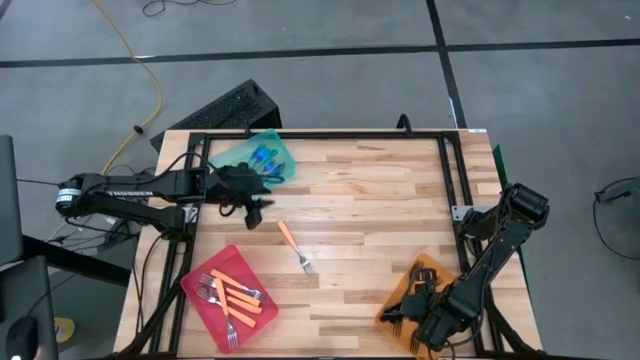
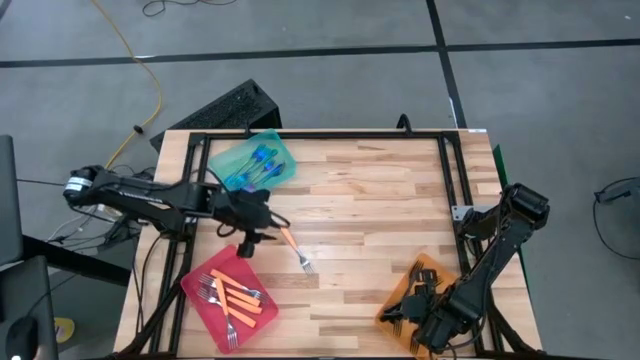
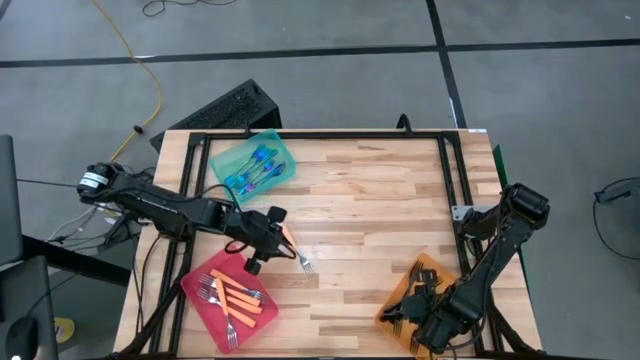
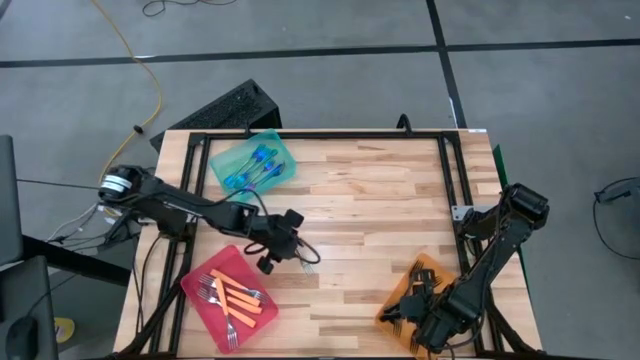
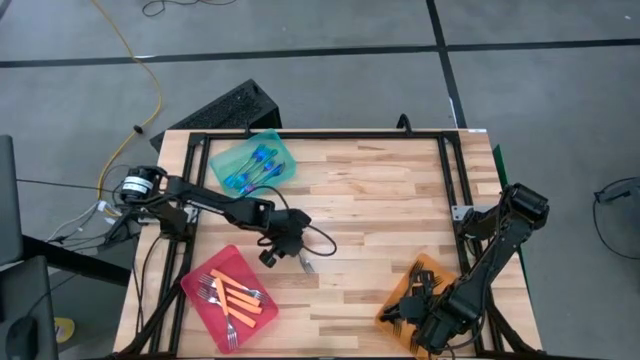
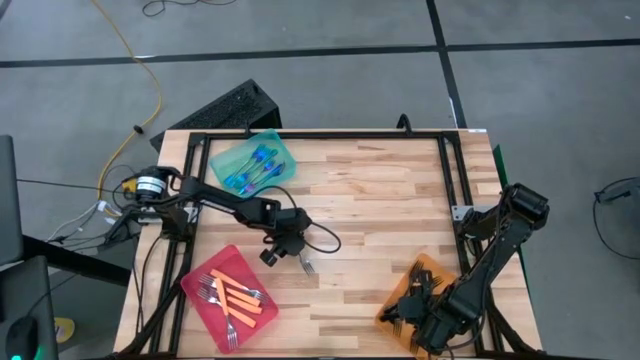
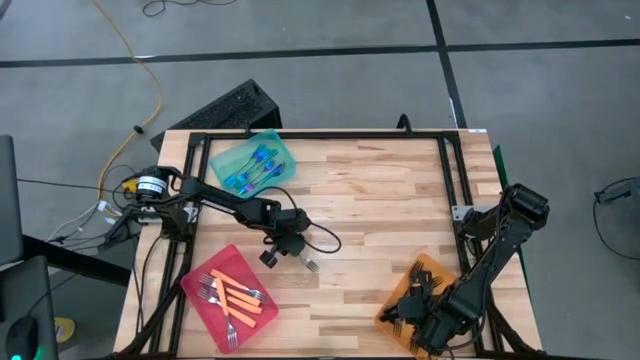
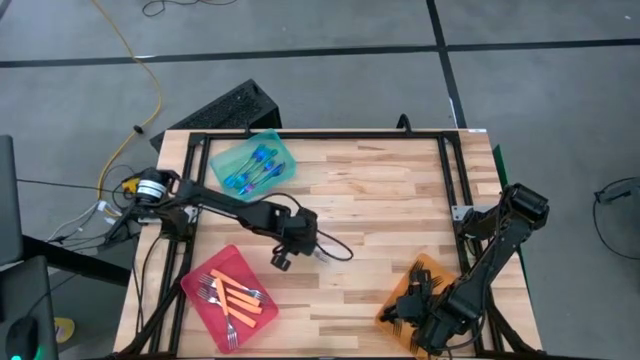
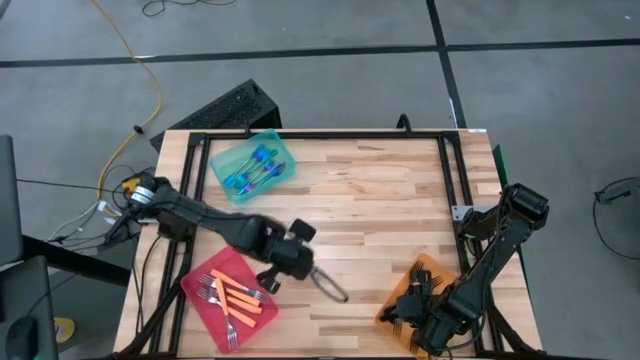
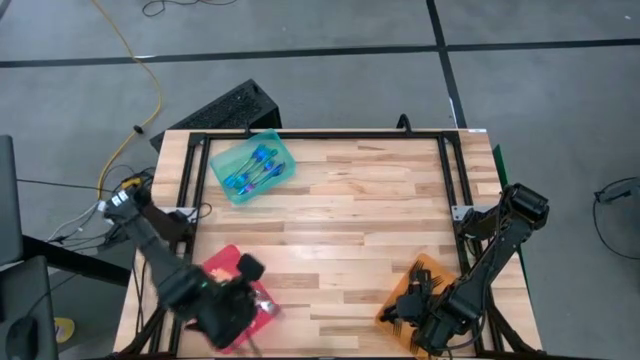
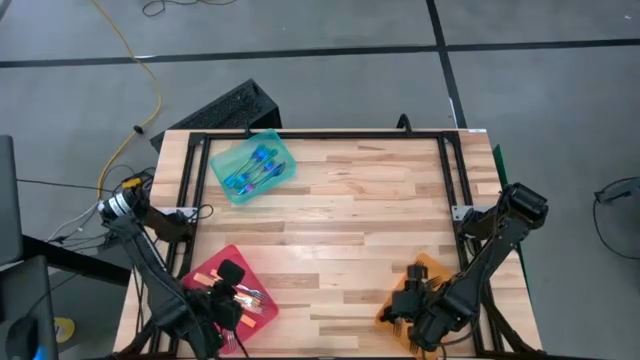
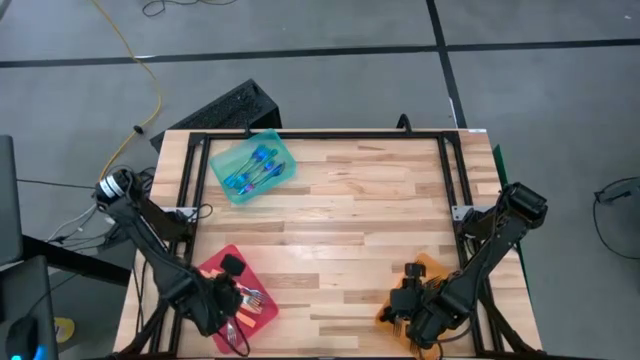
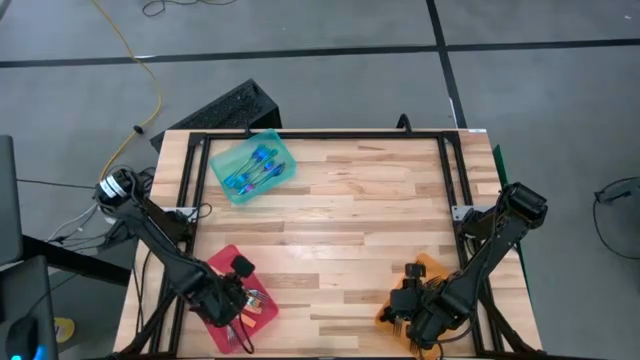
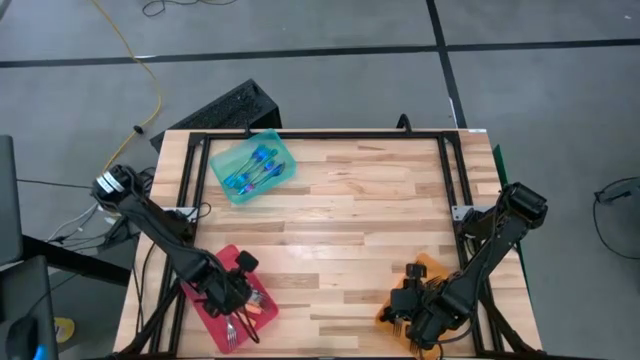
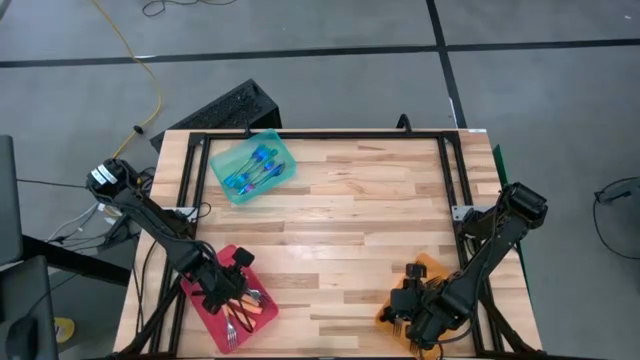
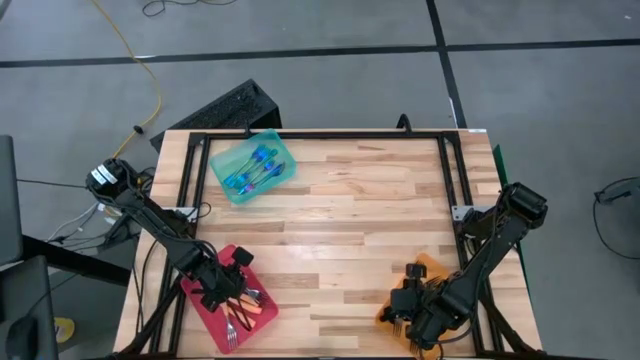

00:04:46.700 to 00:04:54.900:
Task: Sort silverware by color (type)
Put the orange fork into the red bin

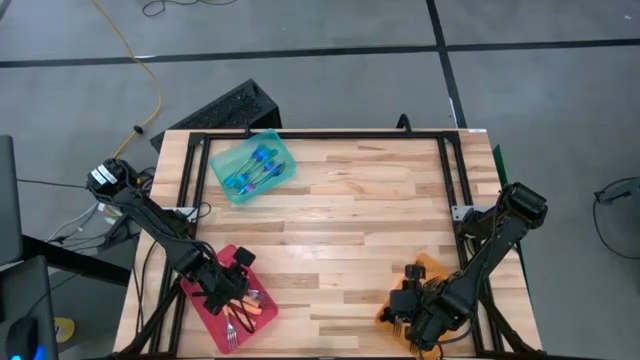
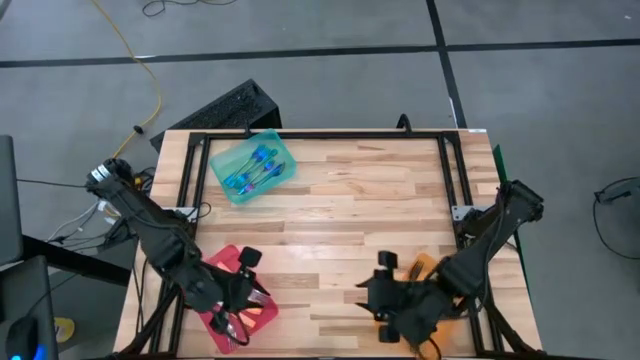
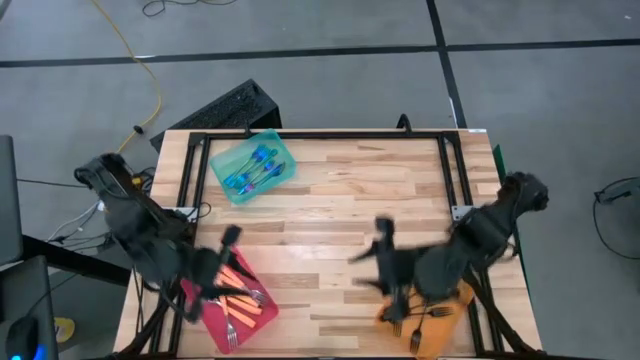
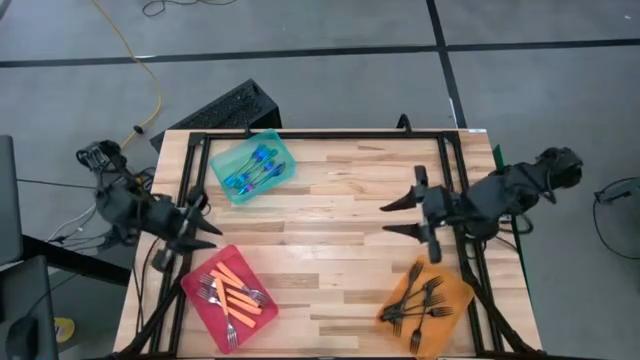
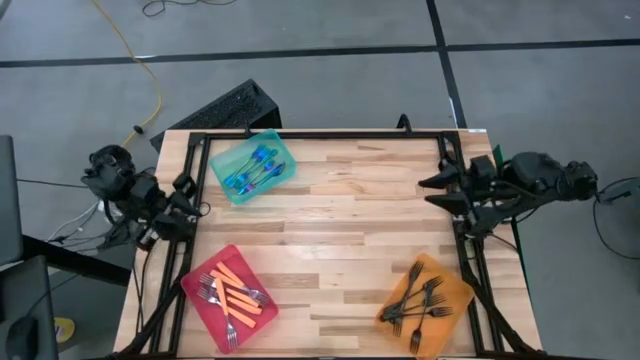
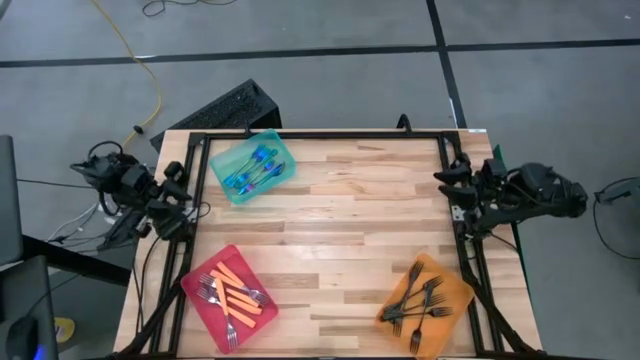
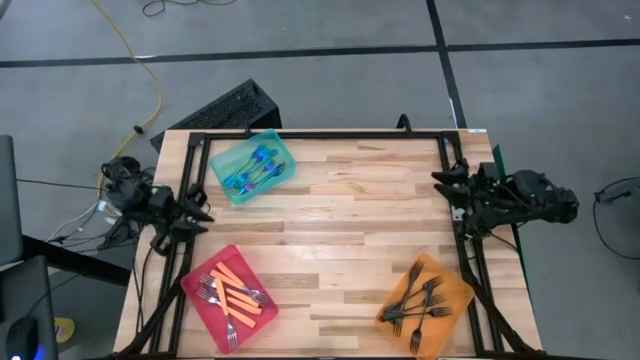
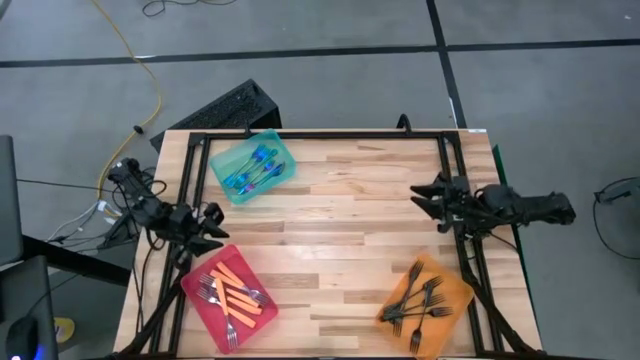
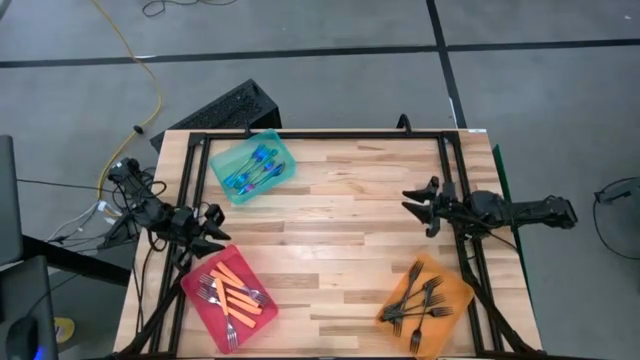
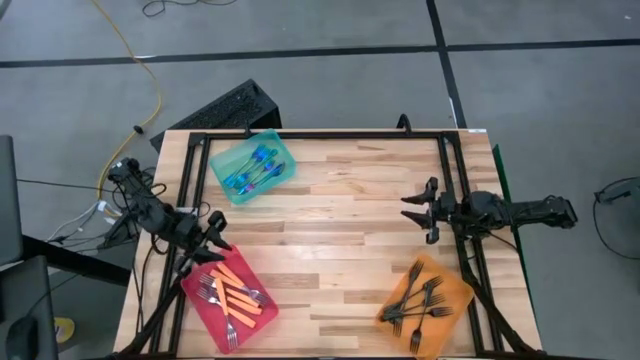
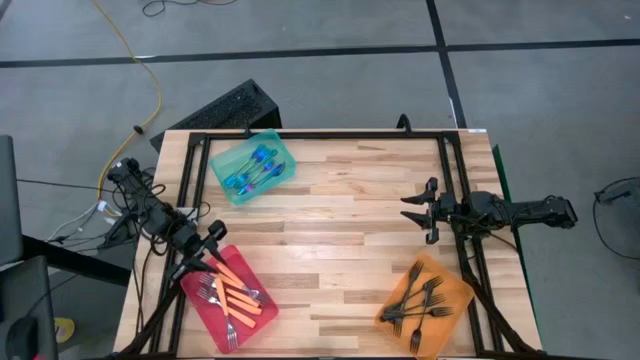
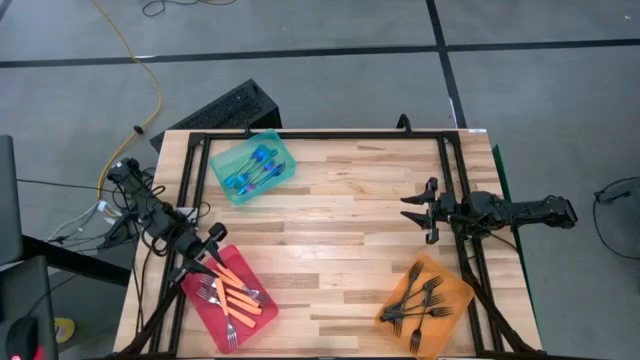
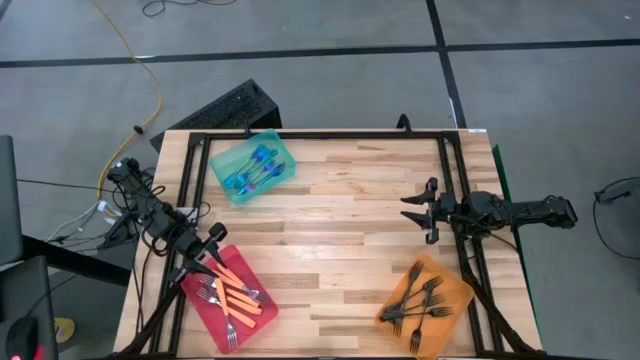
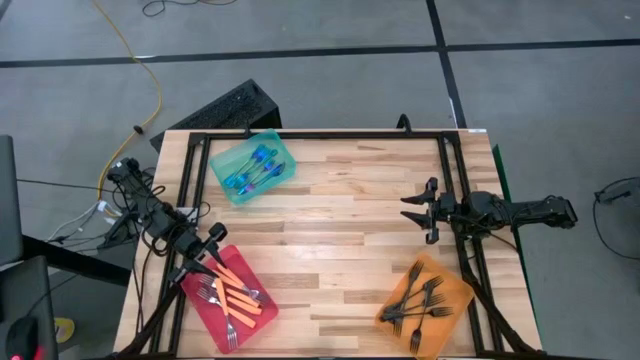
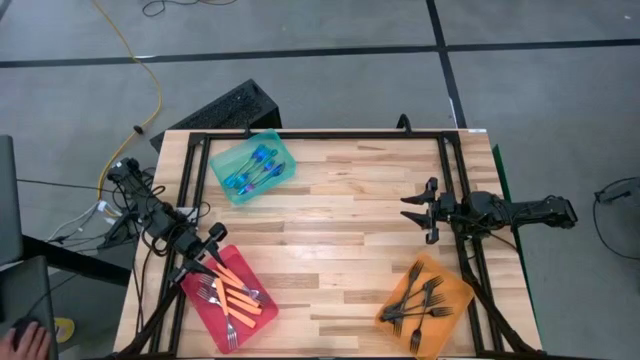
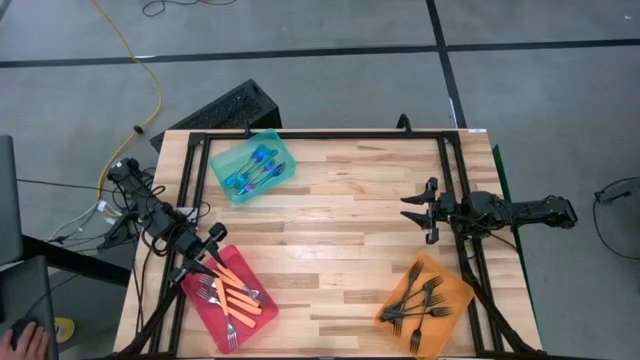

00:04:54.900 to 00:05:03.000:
Return to Home Position

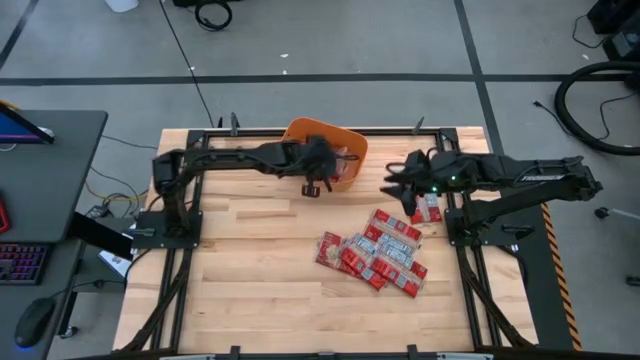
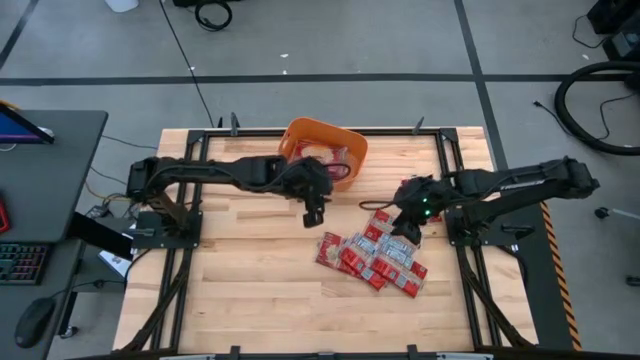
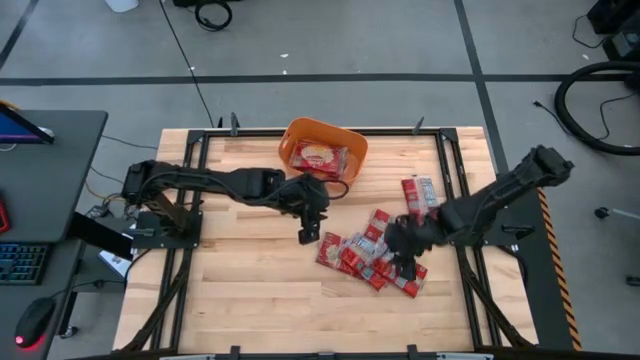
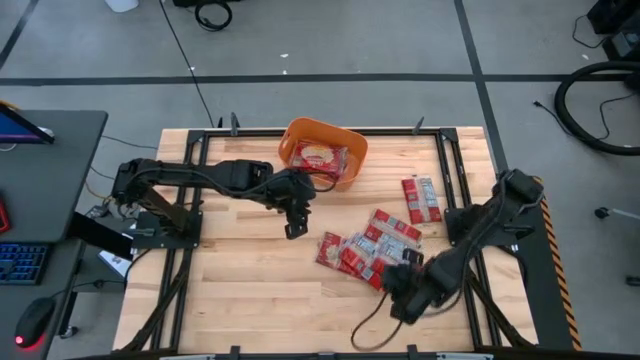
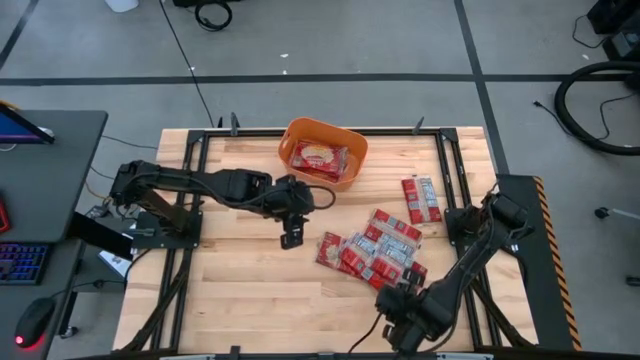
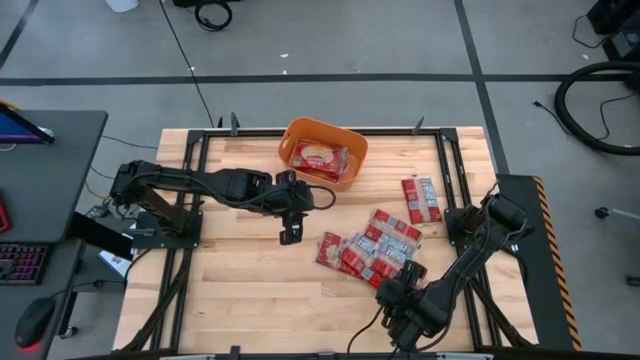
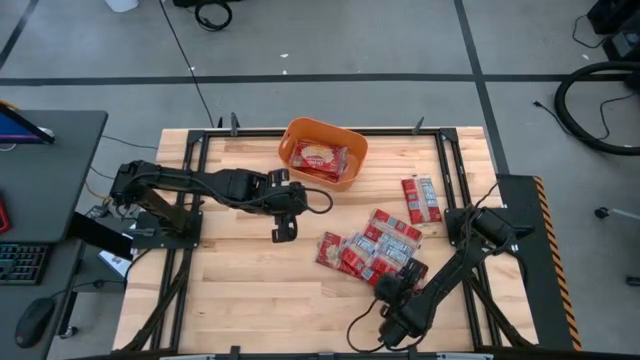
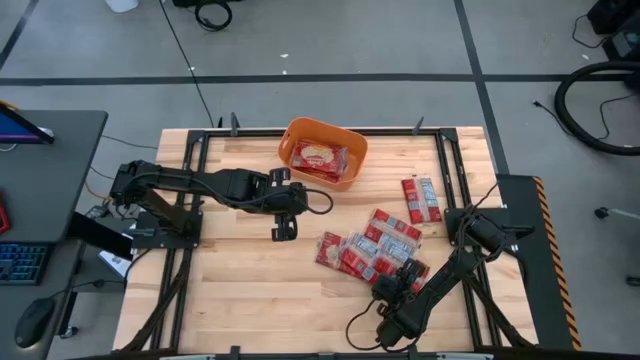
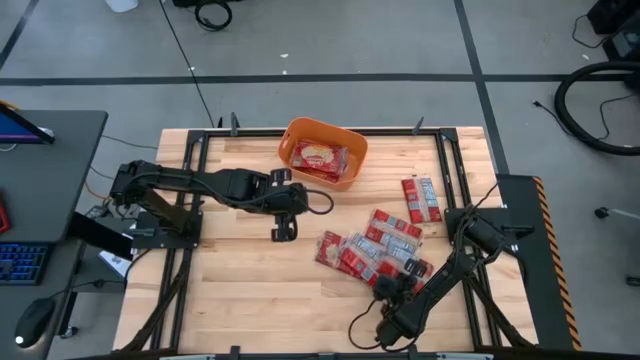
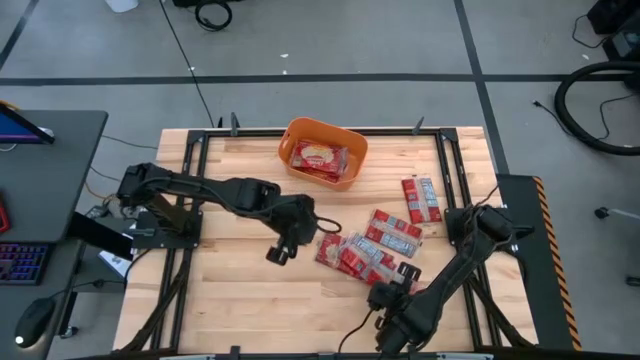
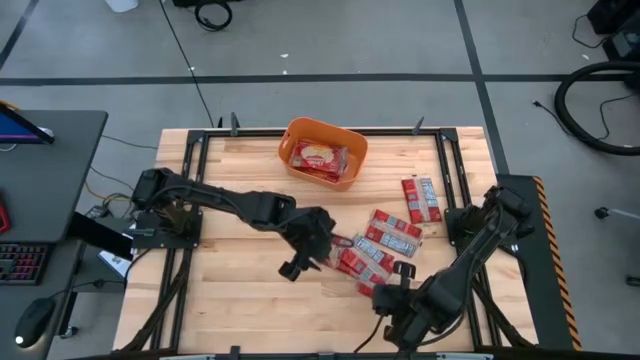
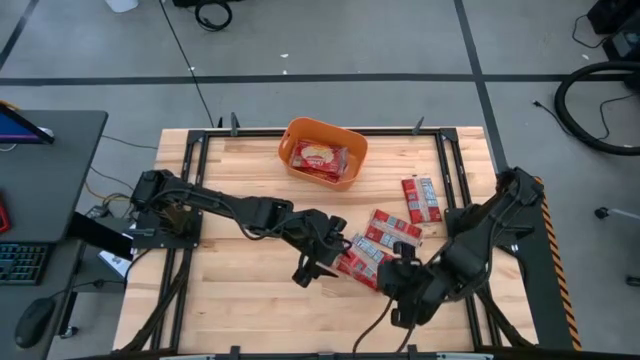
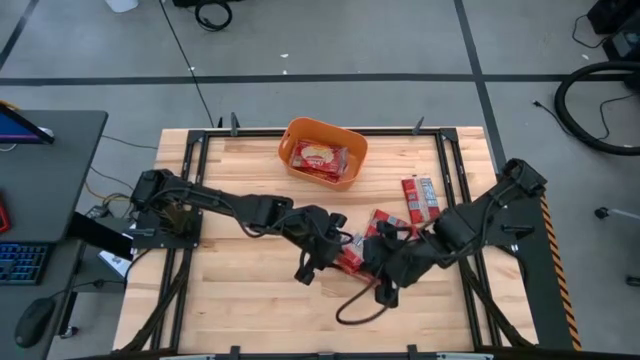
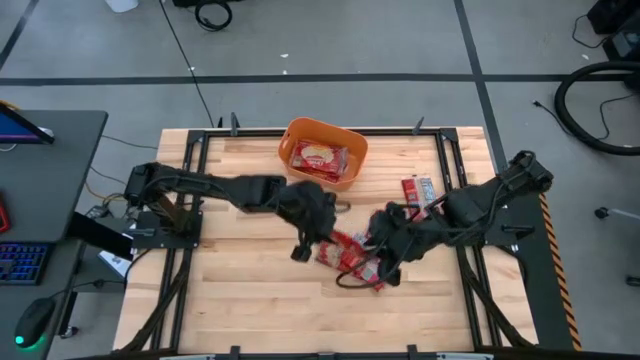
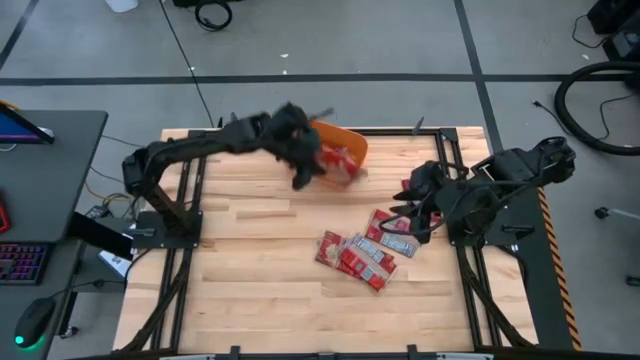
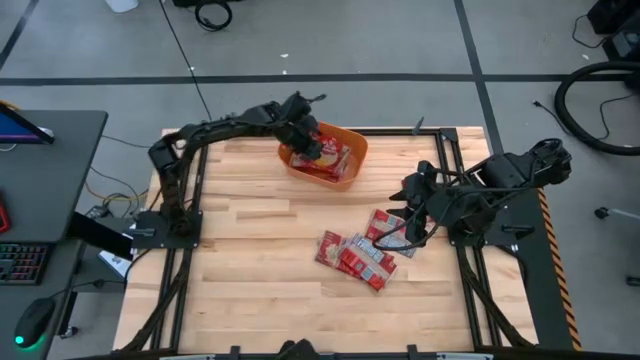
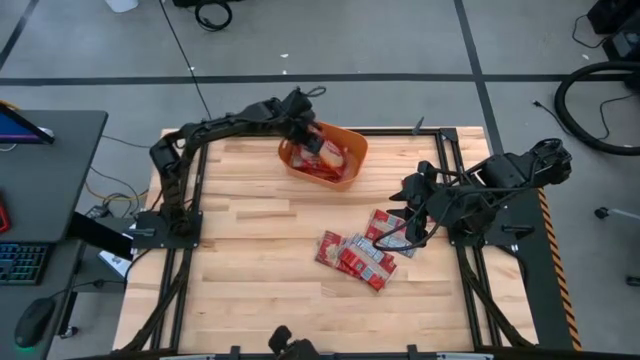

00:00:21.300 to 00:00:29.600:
Task: Sort popcorn bags into baskets
Put the red popcorn bag into the orange bin
